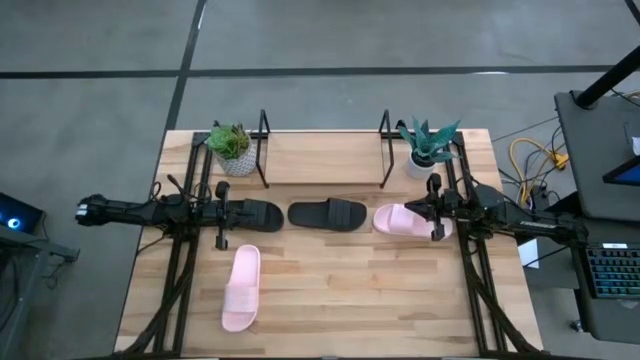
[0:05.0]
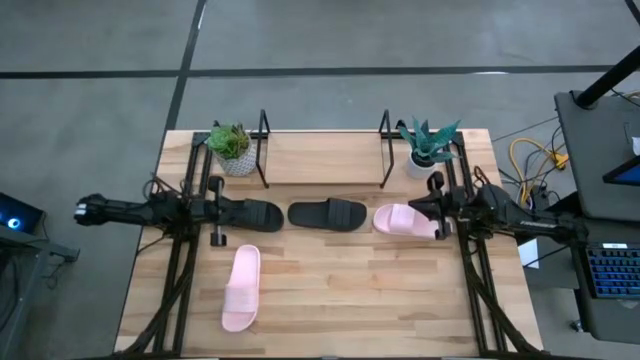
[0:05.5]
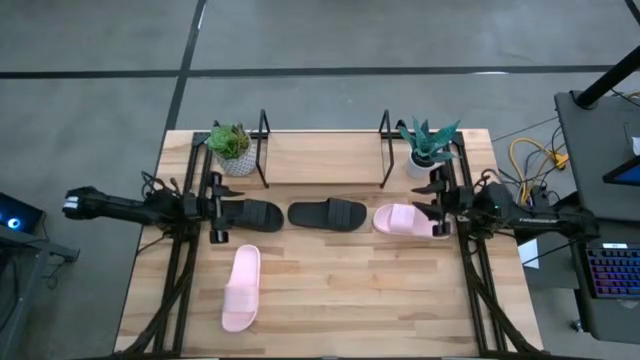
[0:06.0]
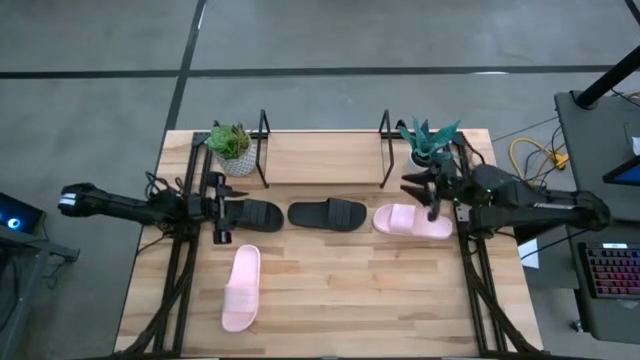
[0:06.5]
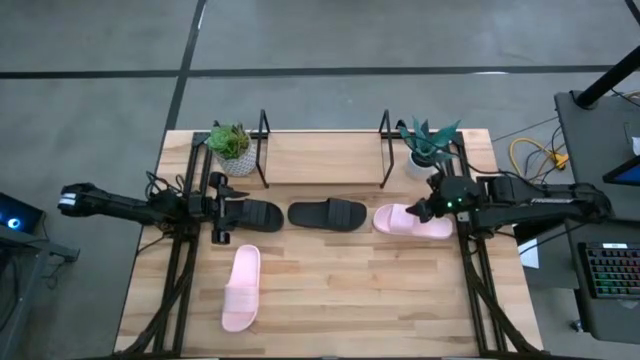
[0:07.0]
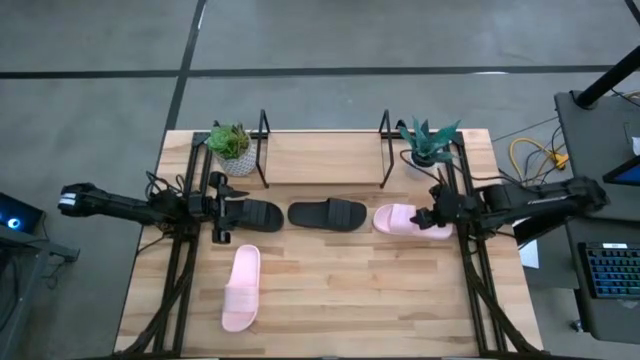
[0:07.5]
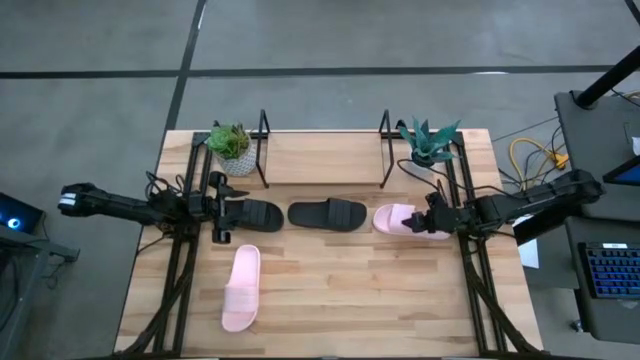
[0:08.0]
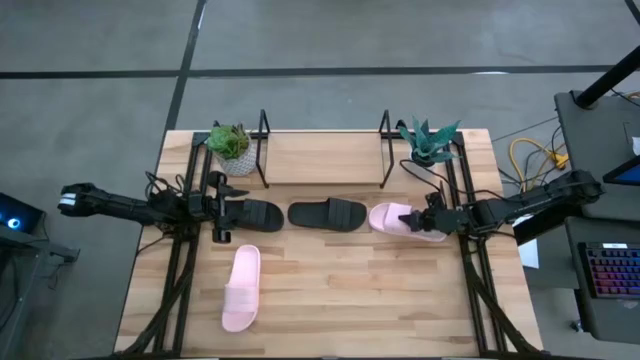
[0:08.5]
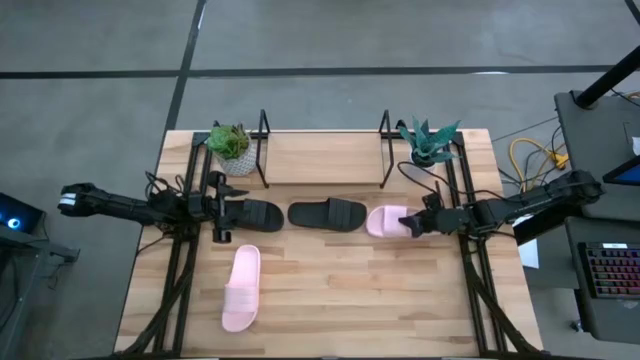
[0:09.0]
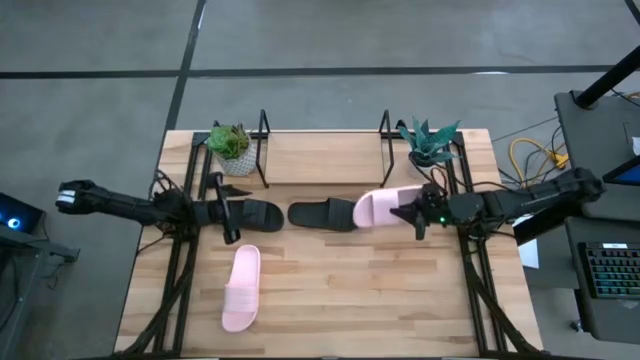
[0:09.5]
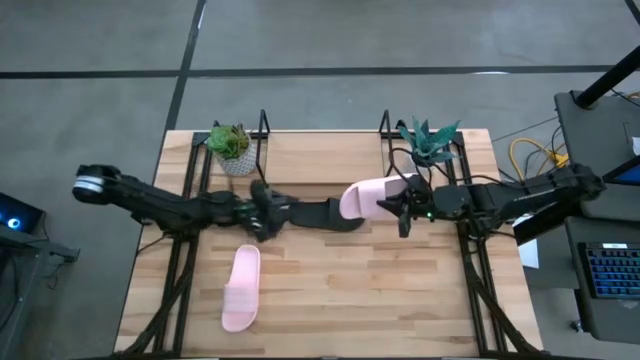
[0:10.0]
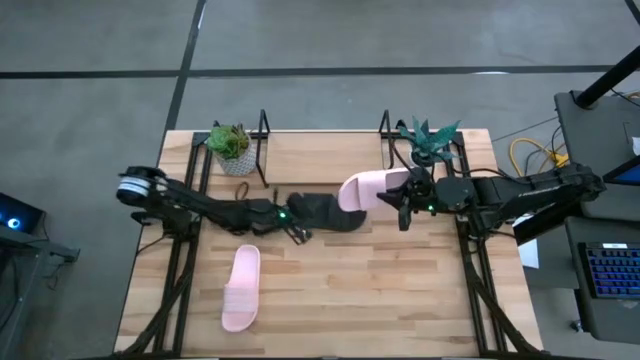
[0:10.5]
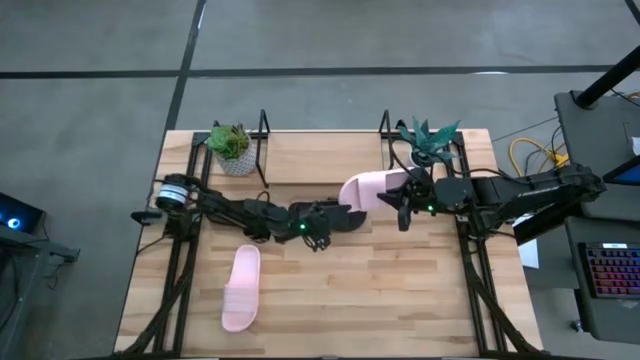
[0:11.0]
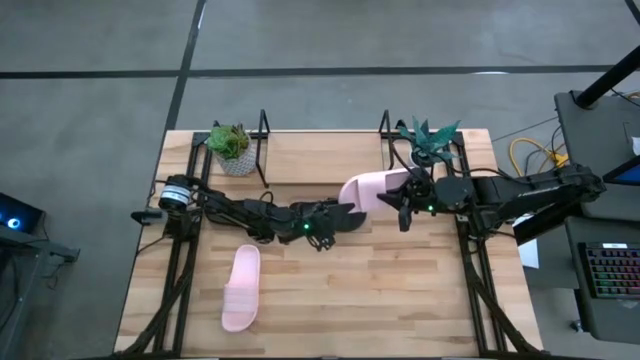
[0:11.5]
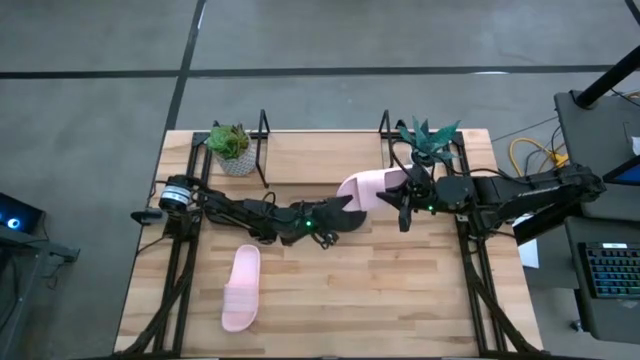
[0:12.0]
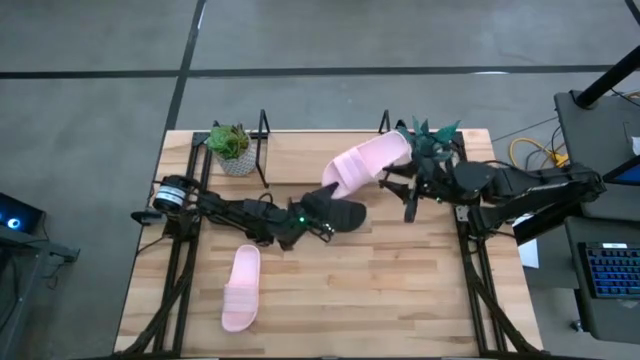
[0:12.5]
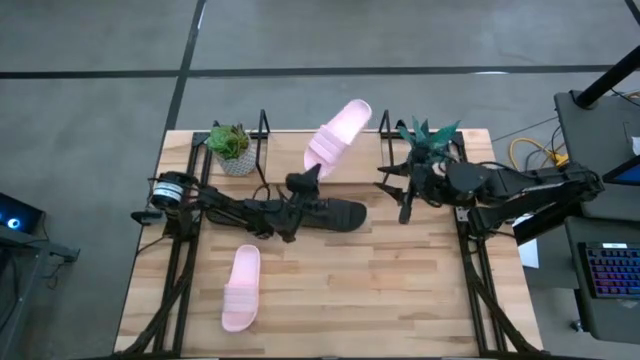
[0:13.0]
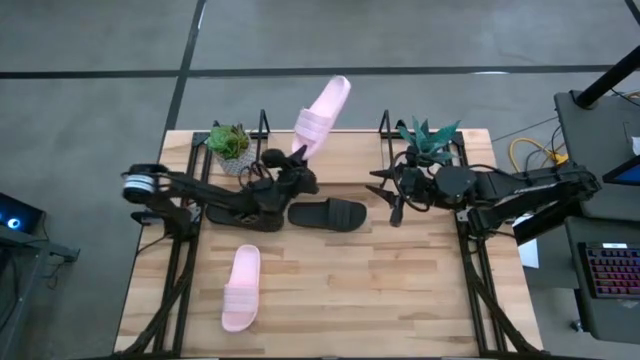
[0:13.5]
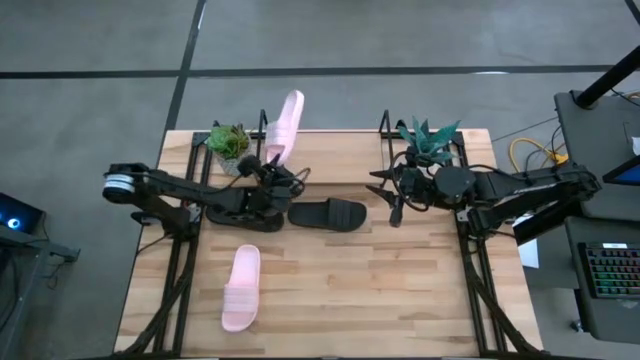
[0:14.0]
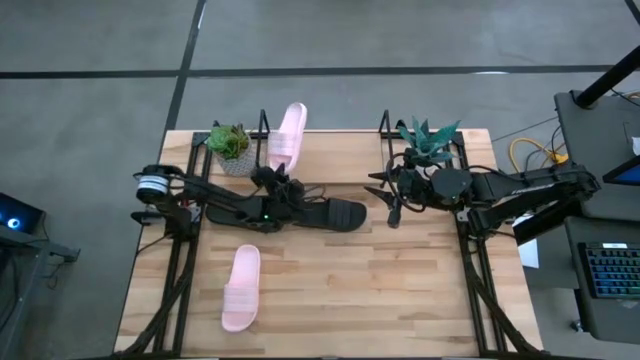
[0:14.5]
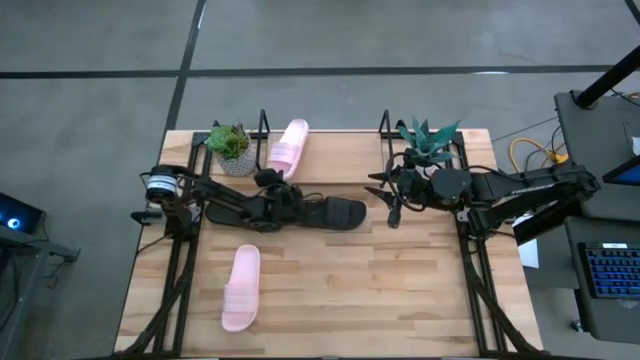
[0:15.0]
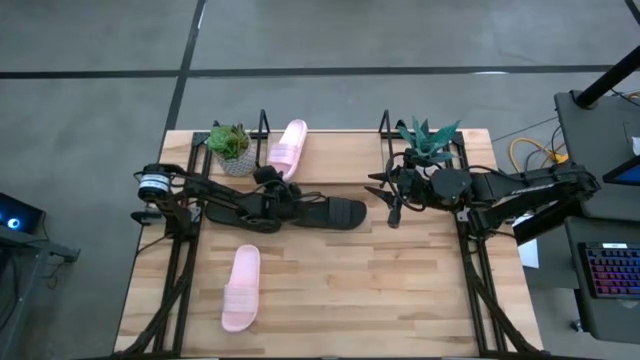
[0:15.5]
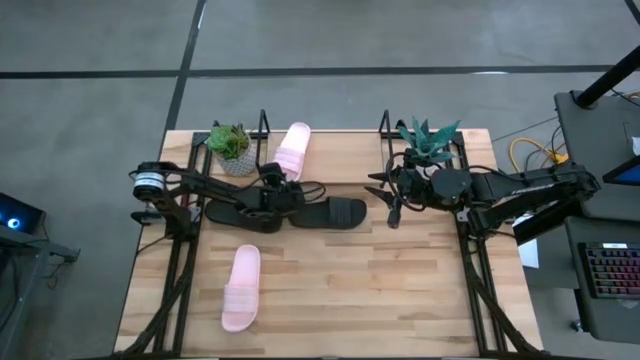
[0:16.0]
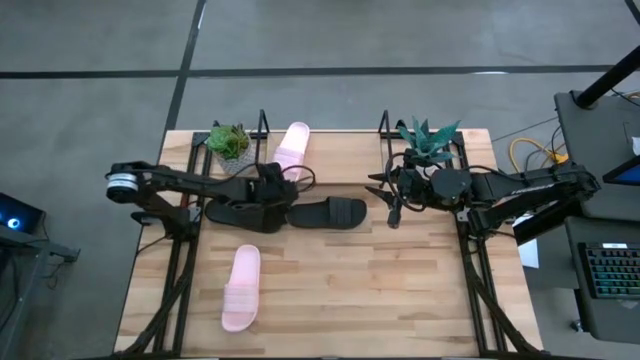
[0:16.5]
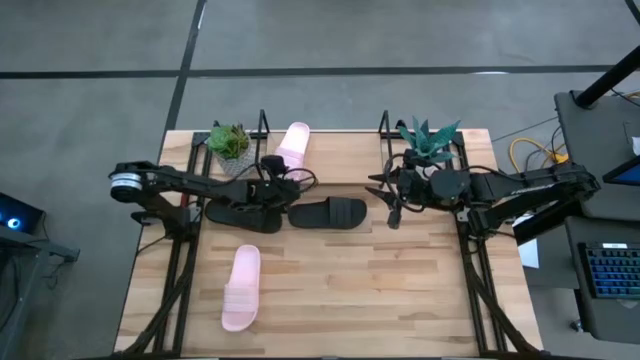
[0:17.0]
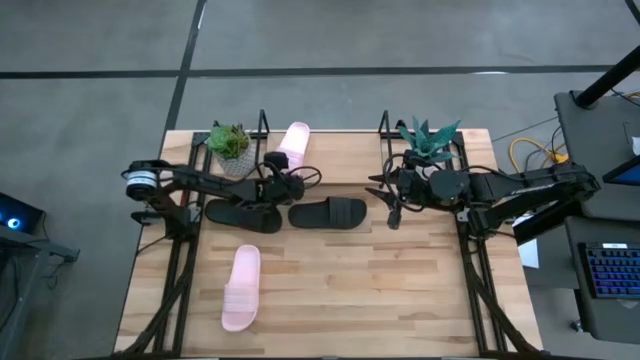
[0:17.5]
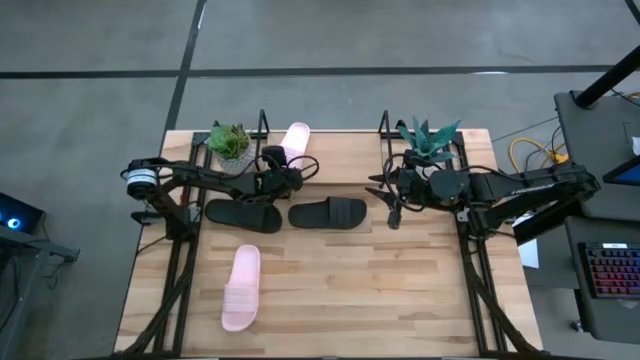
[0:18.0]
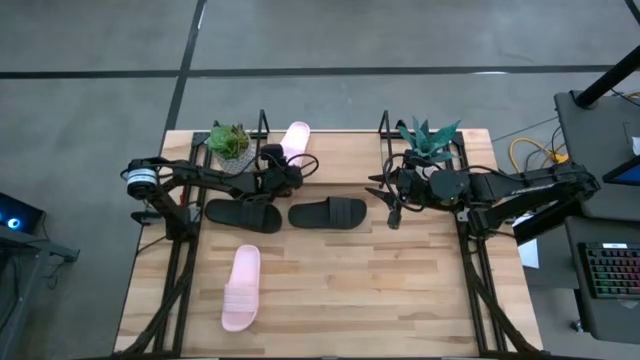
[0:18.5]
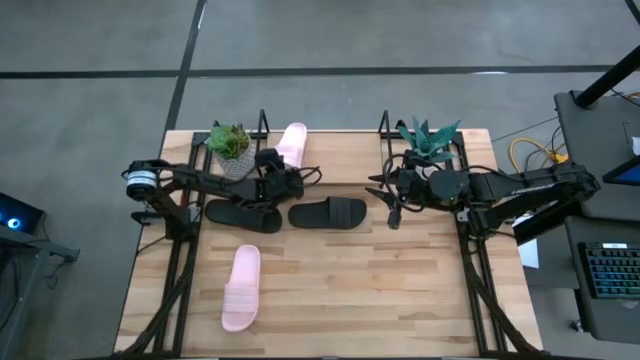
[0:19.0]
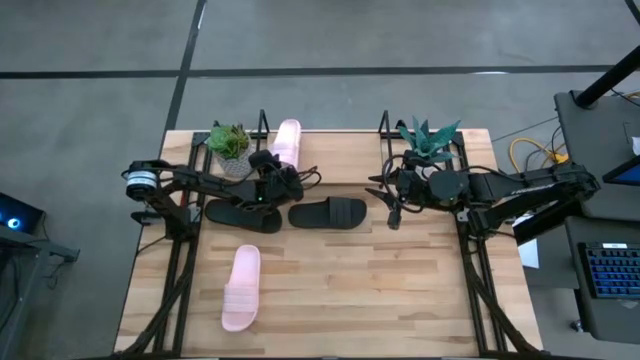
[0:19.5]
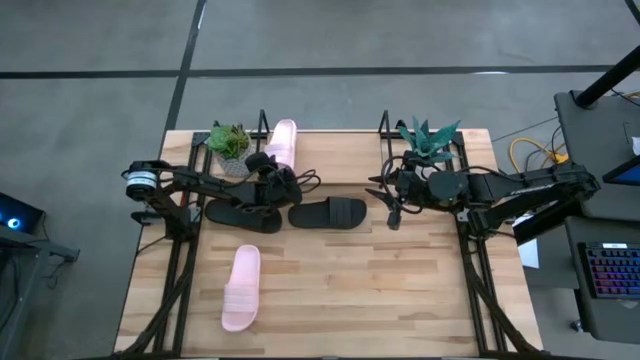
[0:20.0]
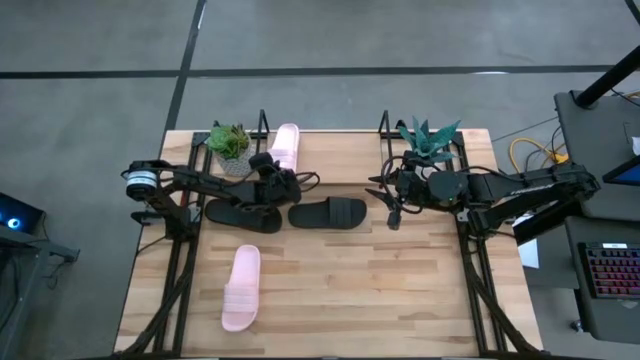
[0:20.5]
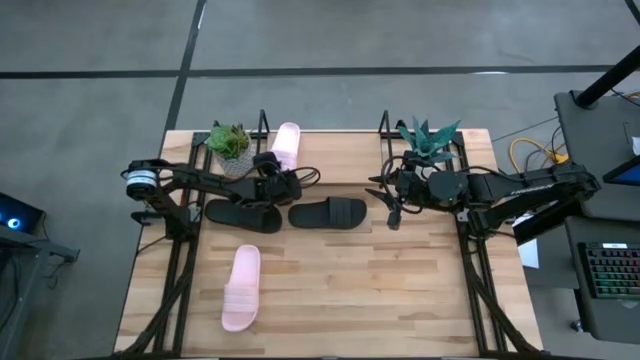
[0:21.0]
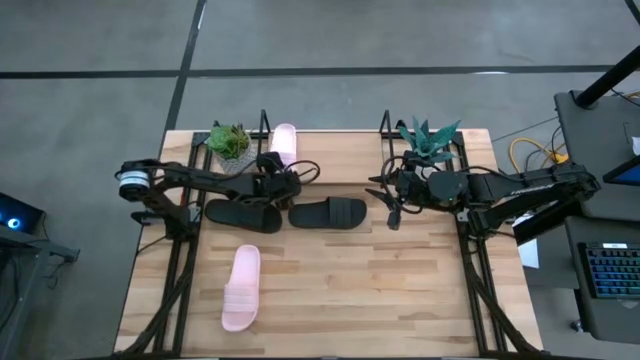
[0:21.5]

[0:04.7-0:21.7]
Task: Pick and place slides into the shelf
Put the top pink slides on the shelf

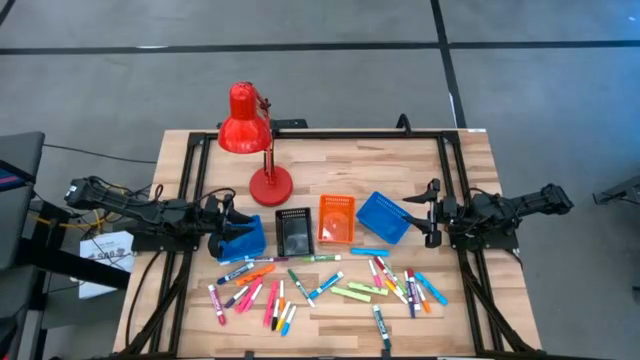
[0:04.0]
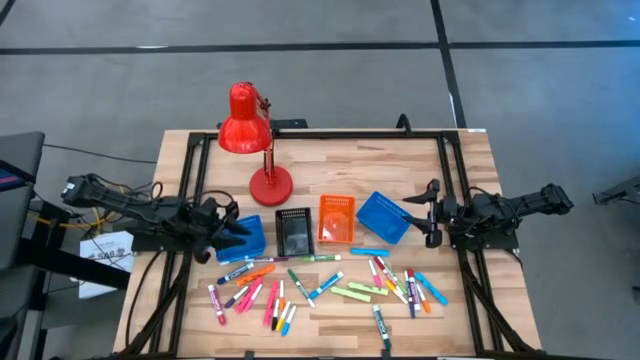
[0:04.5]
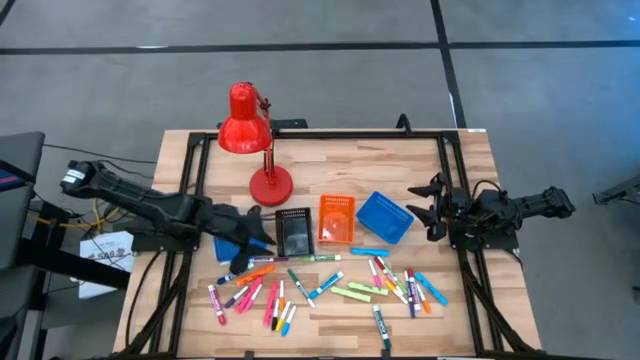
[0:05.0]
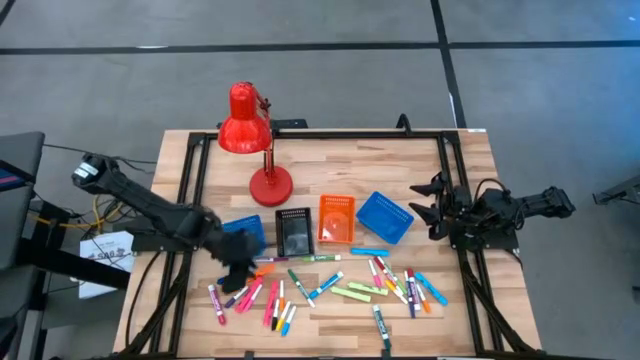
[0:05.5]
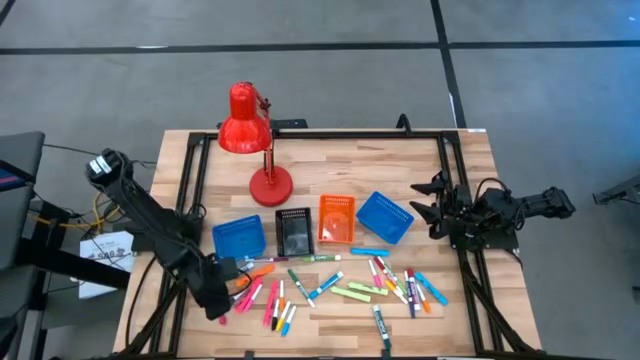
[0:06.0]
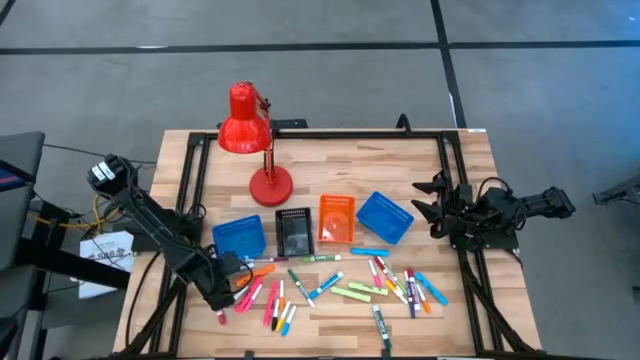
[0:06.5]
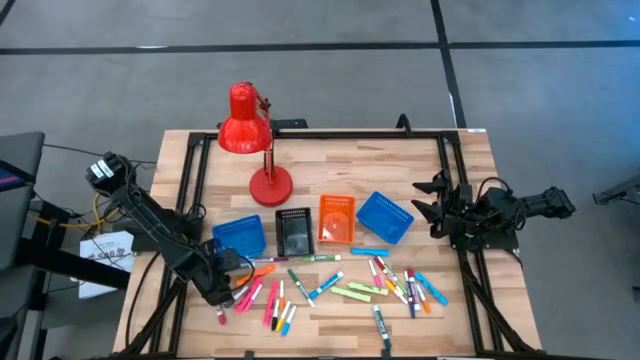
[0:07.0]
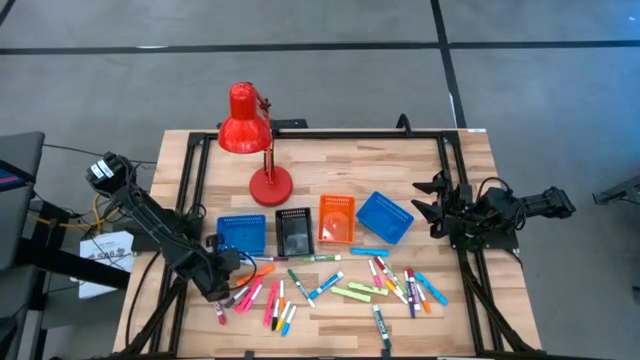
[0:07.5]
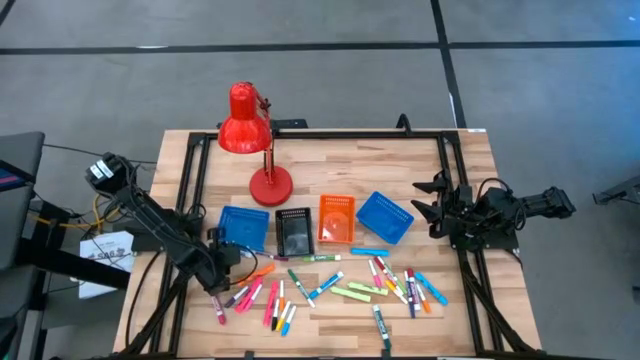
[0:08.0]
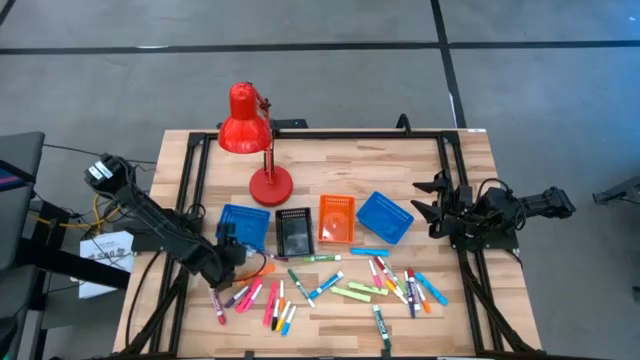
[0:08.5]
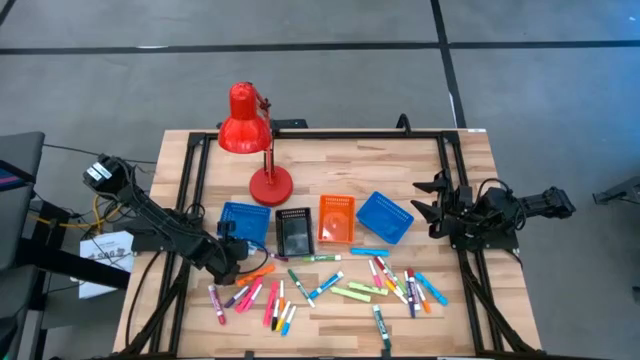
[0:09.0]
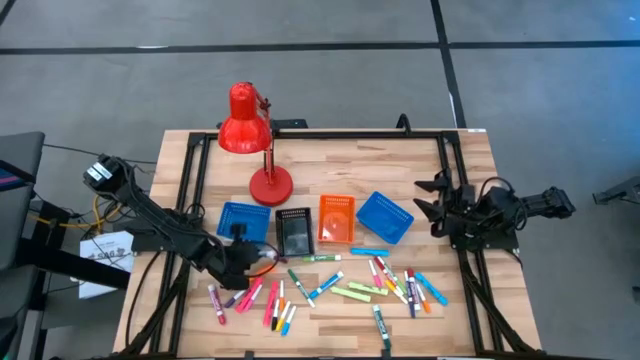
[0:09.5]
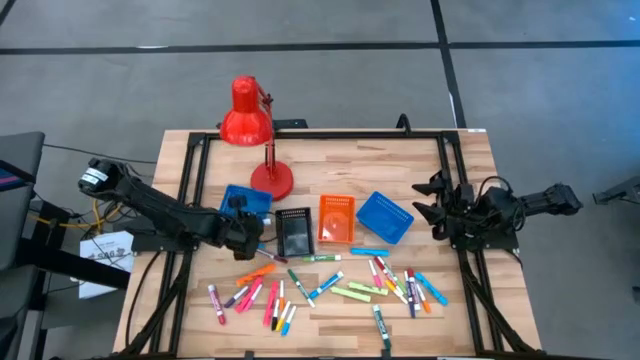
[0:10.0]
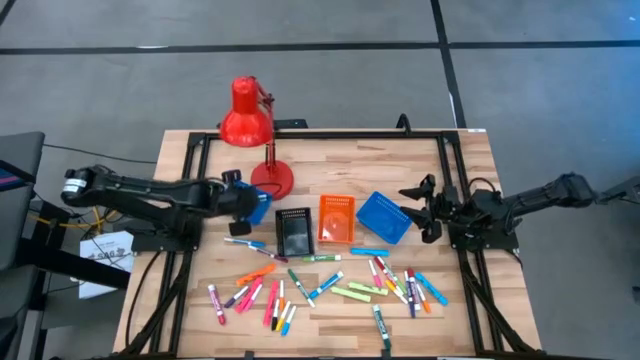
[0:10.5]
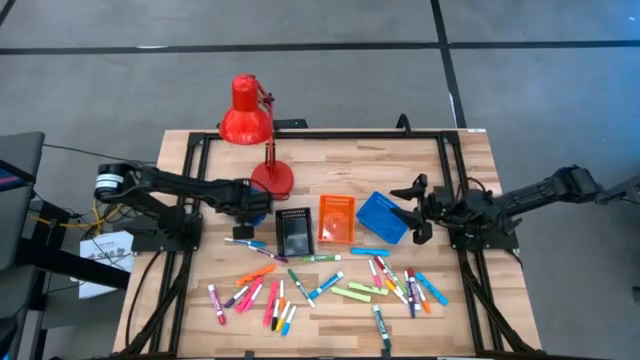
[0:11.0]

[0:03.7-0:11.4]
Task: Pick & Place Markers
Put the large blue marker pen into the left blue basket
